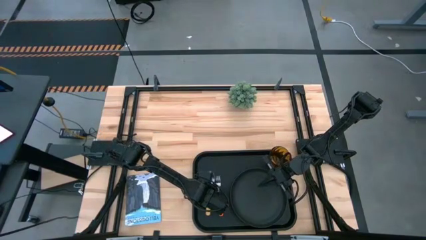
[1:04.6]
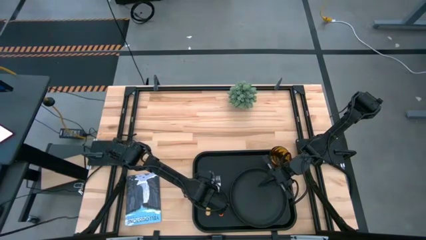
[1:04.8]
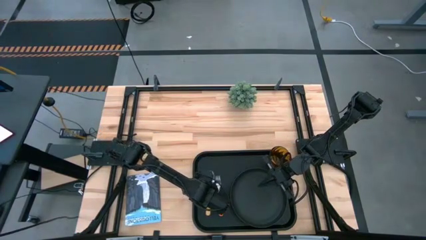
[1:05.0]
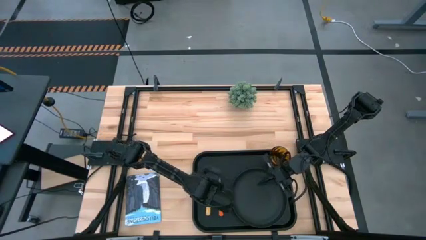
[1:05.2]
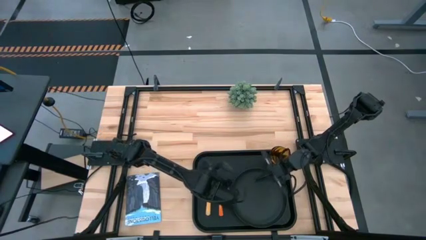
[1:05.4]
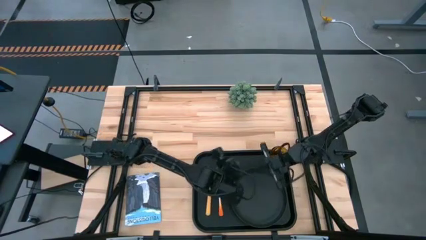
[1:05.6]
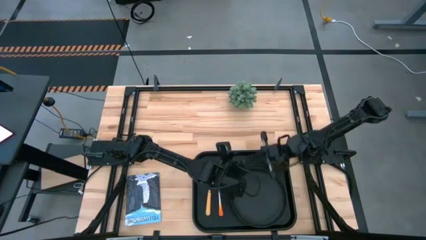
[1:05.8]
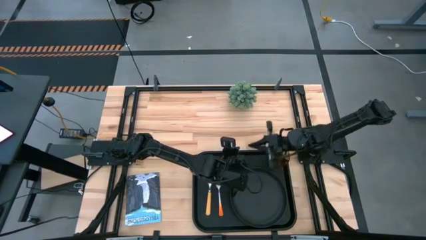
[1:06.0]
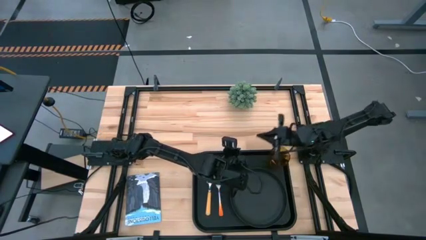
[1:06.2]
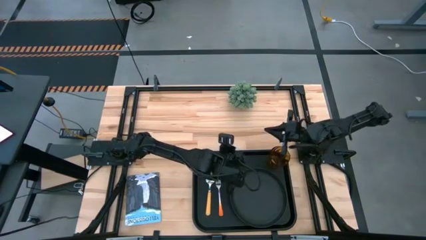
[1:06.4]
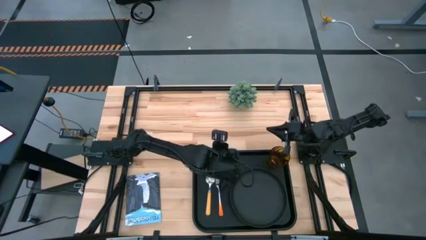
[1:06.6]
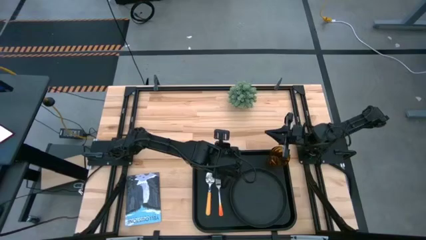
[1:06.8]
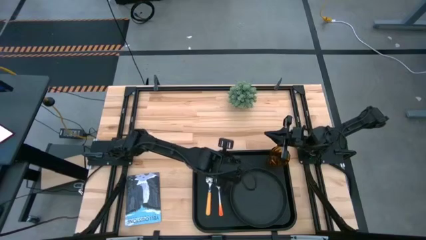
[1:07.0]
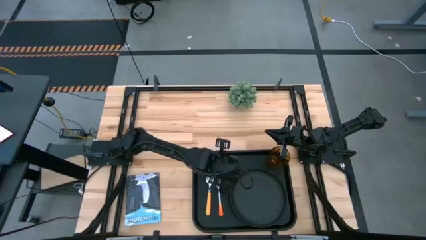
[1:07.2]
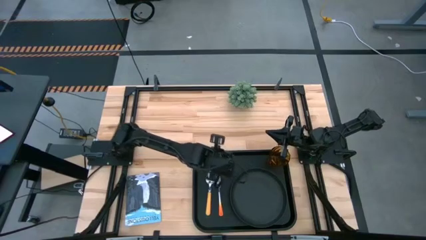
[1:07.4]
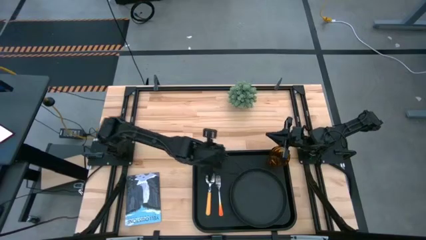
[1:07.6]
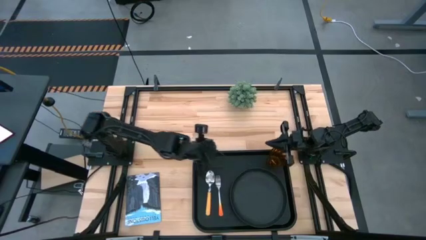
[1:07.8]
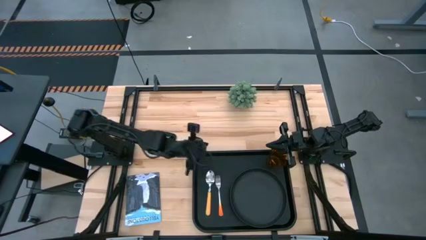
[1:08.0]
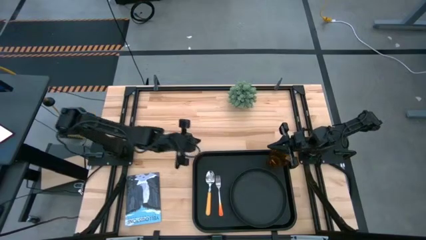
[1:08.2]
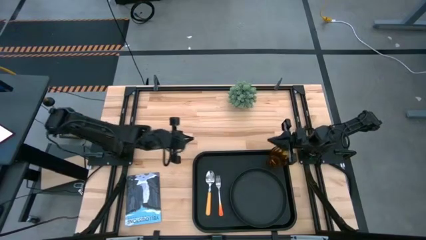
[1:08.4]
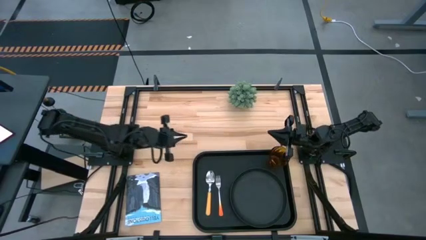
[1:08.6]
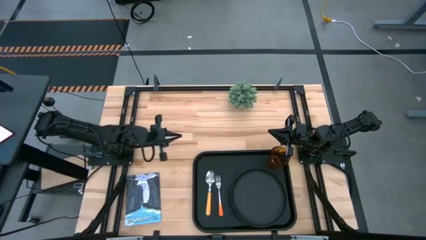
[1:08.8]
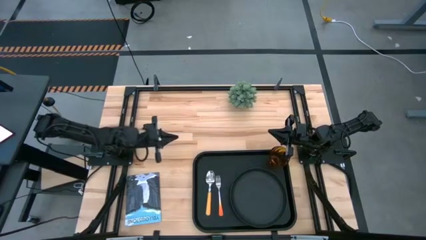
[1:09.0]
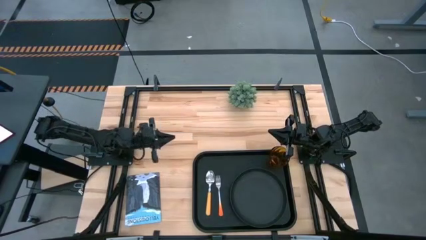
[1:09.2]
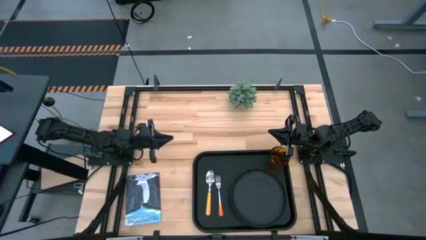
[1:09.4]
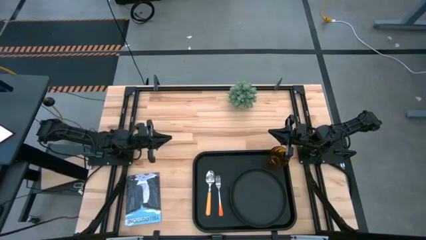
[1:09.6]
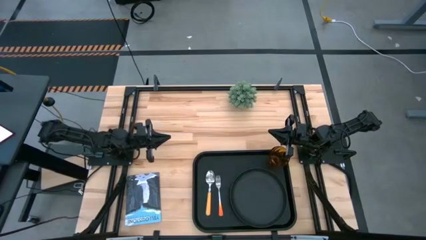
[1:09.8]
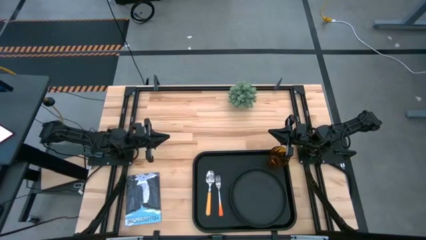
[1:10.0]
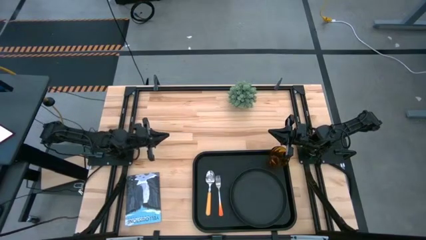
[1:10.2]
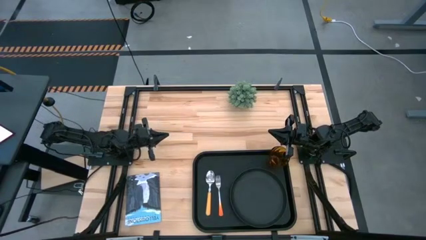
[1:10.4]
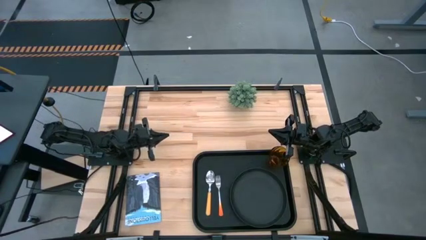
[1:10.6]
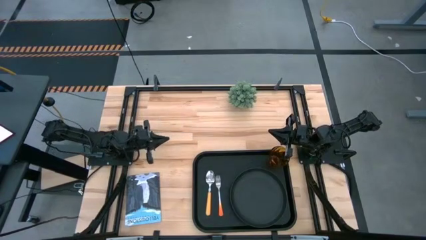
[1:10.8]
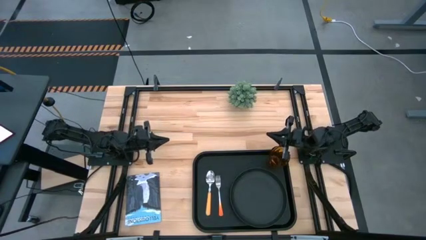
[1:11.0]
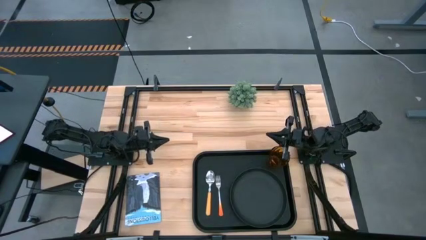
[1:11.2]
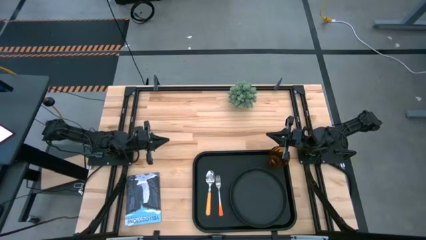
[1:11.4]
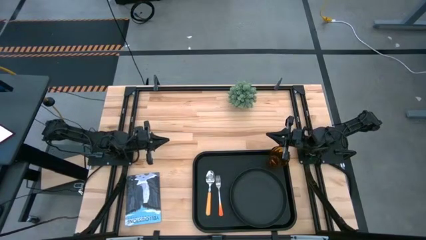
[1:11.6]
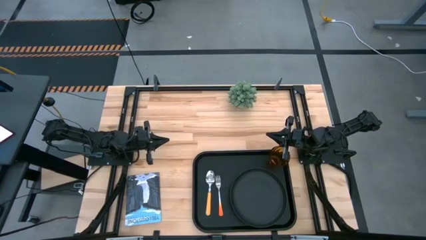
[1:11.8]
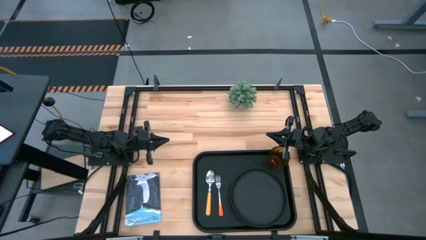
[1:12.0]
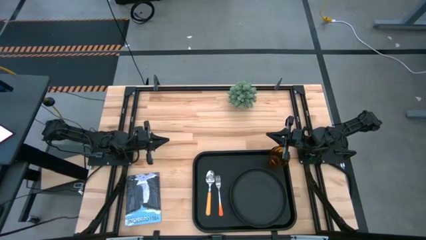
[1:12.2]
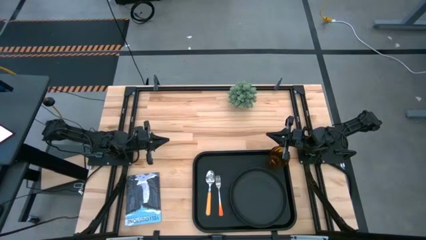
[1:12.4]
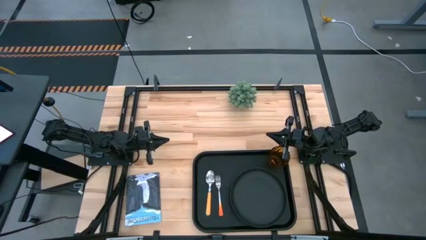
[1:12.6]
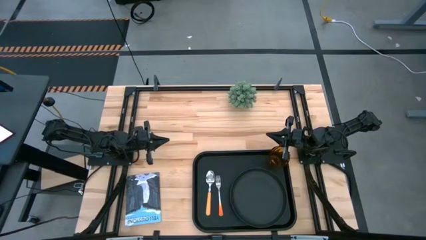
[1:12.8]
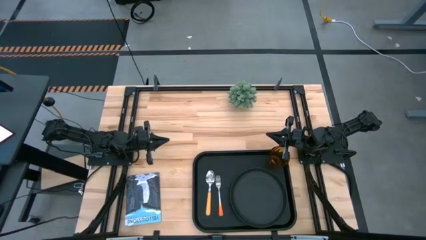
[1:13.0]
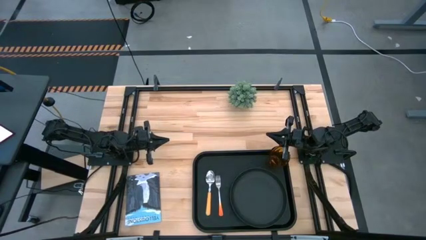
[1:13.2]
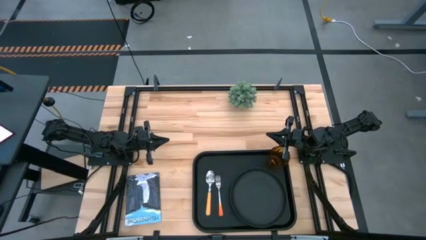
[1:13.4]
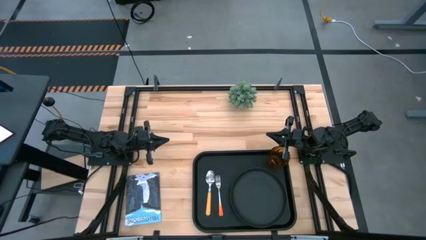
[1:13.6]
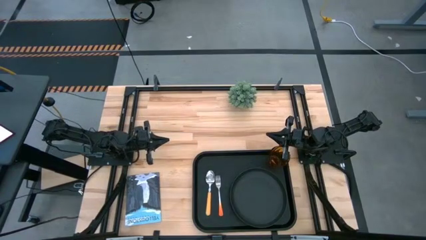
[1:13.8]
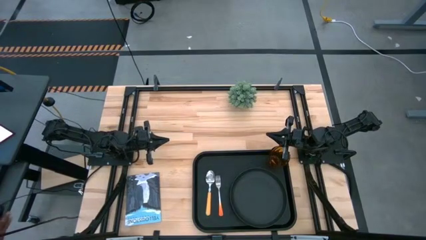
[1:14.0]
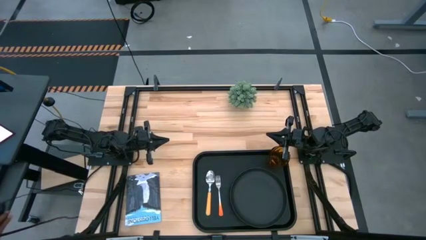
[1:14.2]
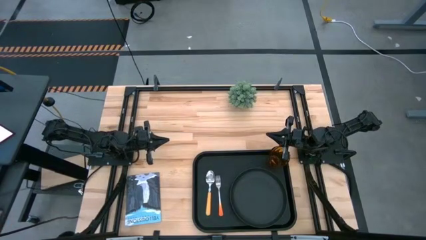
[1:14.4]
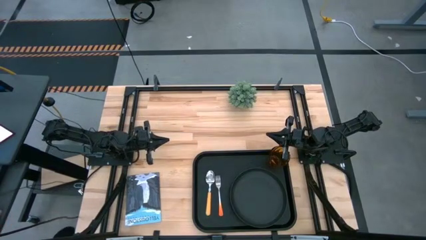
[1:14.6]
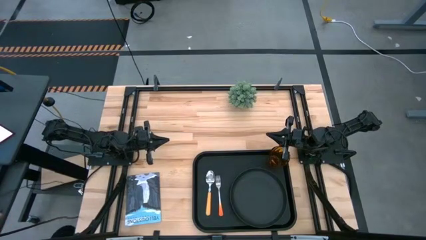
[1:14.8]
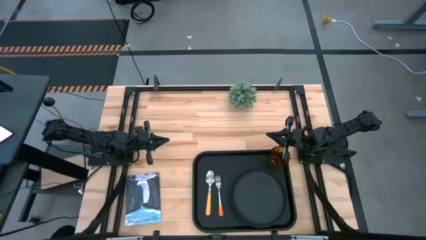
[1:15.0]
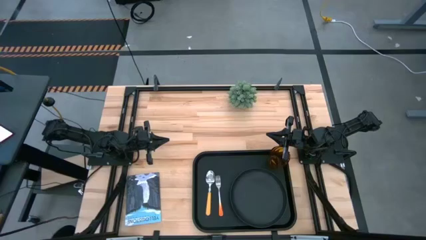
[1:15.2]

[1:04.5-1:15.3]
Task: Pick and place plate/cup/fork/spoon on tray
Return to Home Position

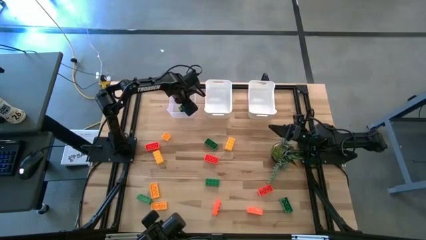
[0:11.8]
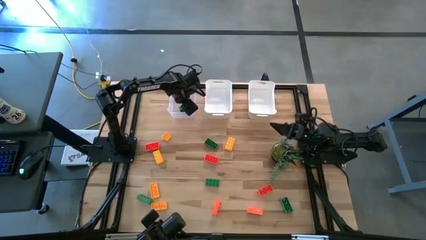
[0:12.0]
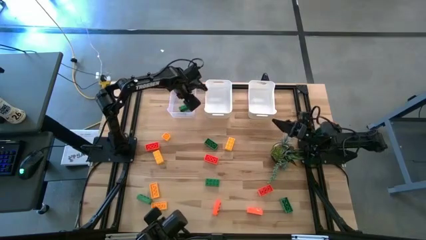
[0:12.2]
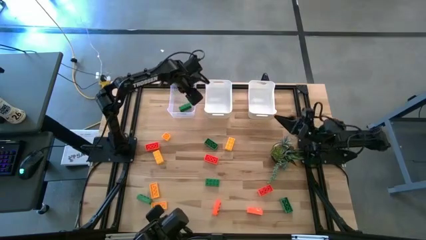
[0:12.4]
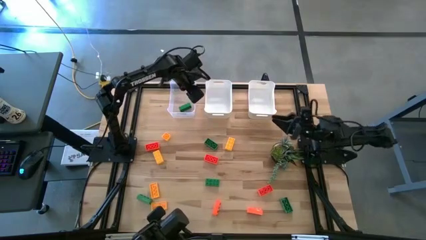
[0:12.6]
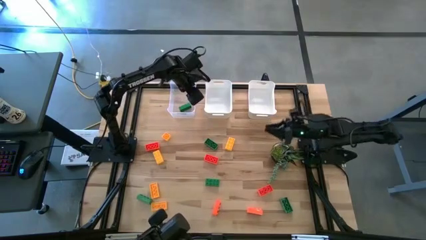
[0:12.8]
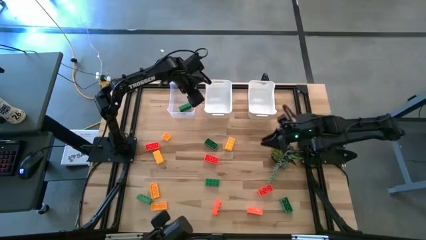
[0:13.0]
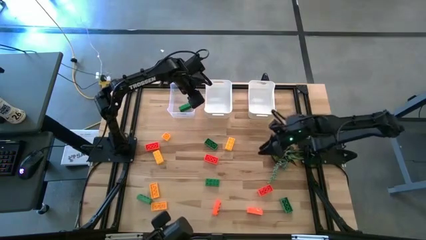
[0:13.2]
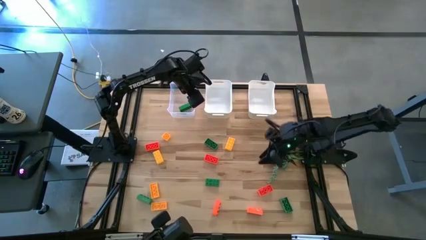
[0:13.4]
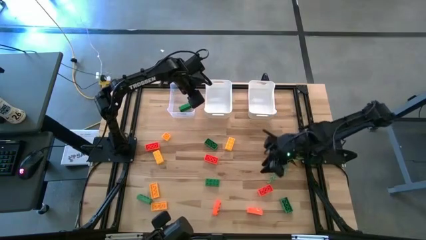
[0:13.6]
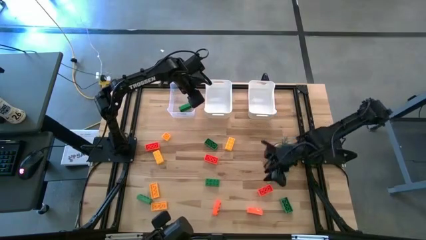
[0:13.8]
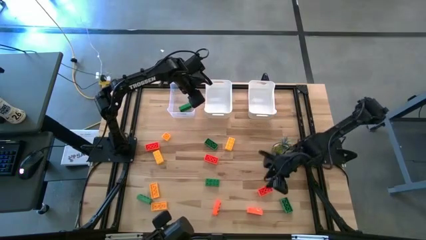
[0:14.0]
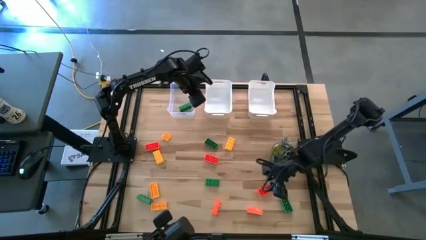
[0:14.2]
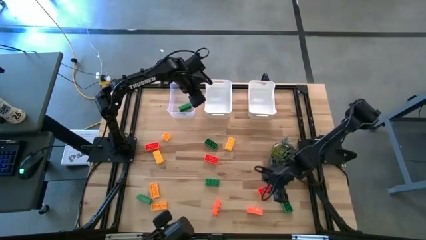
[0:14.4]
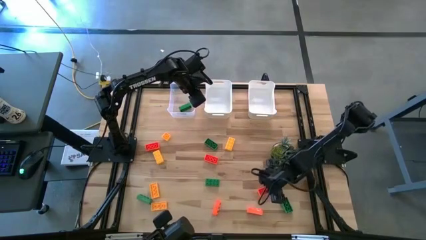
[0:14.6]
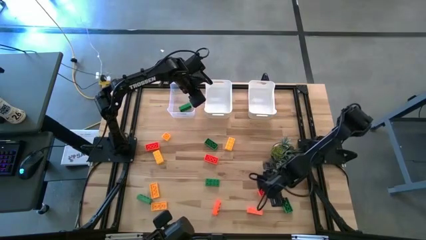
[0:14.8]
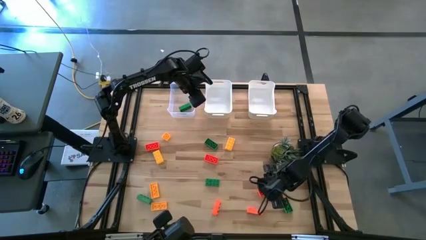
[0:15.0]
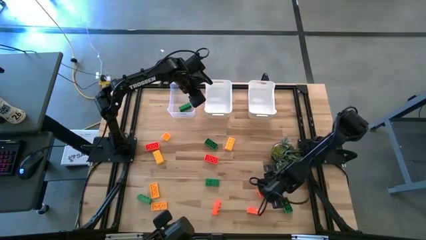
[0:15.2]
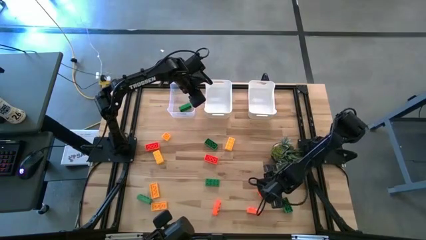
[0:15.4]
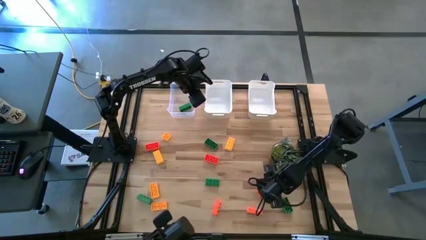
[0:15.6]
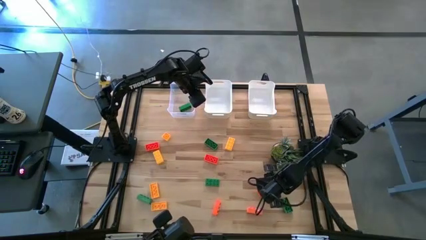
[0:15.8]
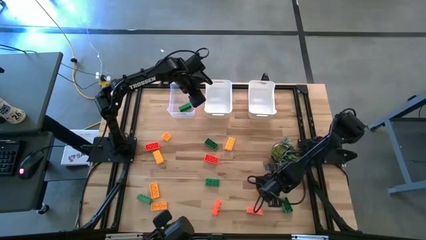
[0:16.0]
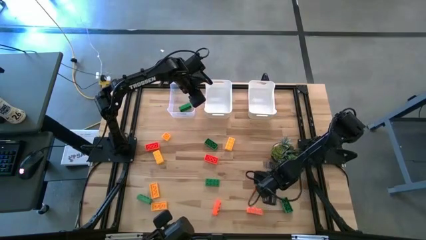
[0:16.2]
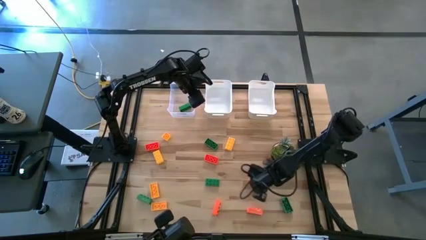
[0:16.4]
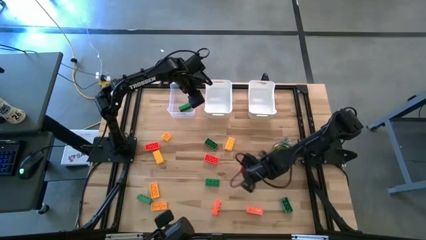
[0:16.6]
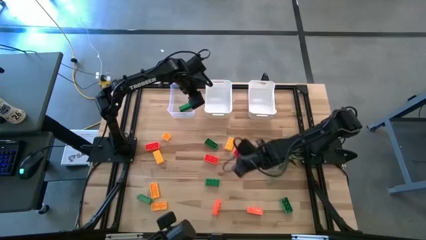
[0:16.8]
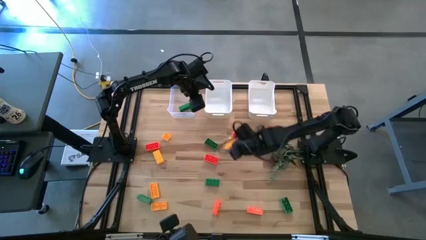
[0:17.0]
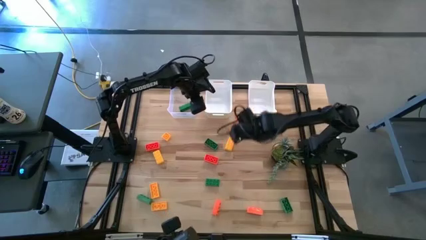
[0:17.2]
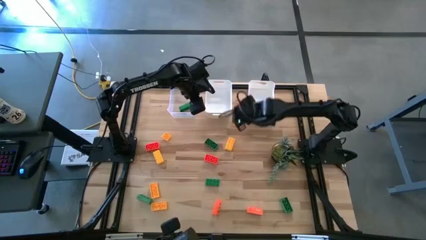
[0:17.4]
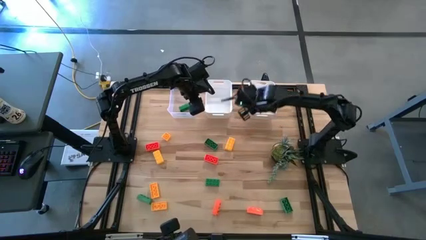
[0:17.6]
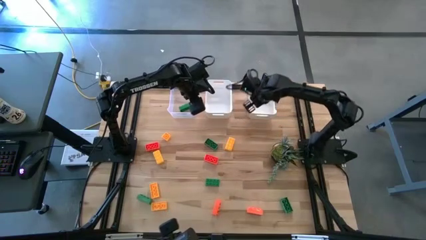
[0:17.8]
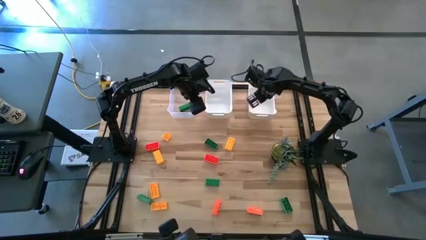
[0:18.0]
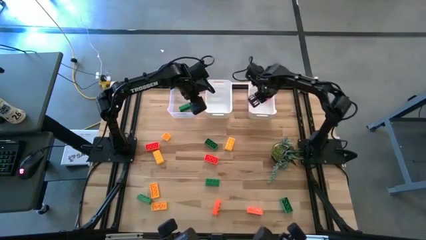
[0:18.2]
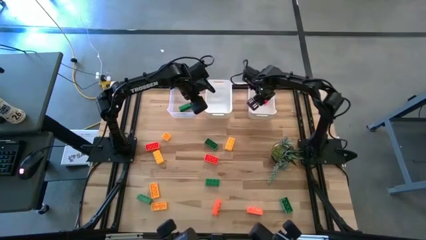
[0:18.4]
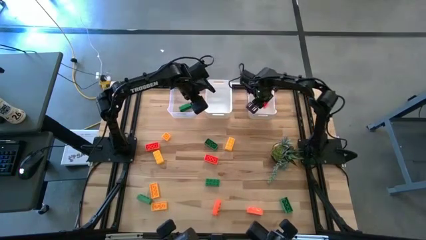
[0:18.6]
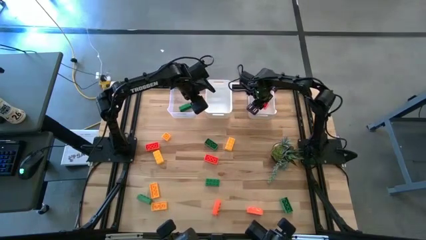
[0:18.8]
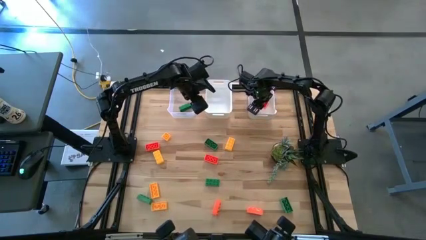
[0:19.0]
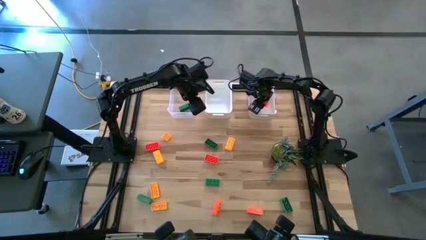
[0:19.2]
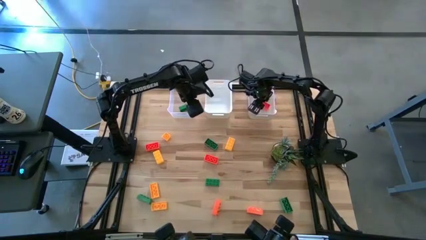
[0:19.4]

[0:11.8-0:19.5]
Task: Sort & place blocks by color
Put the orange game piece into the right white bin
